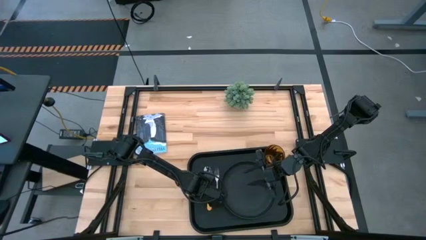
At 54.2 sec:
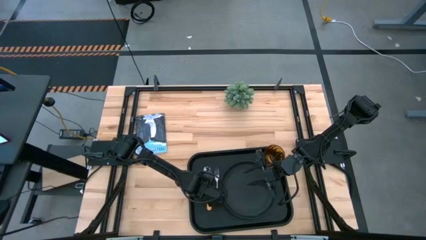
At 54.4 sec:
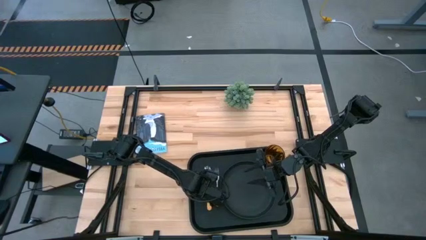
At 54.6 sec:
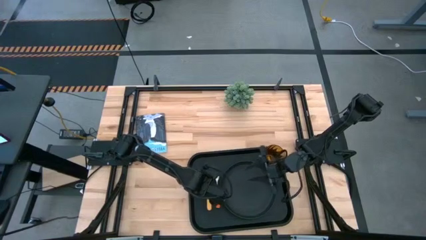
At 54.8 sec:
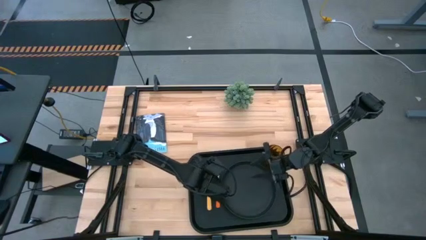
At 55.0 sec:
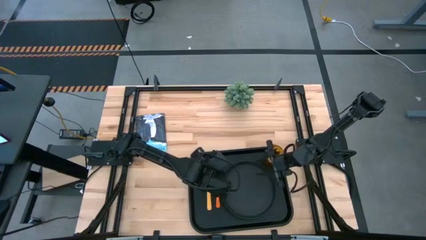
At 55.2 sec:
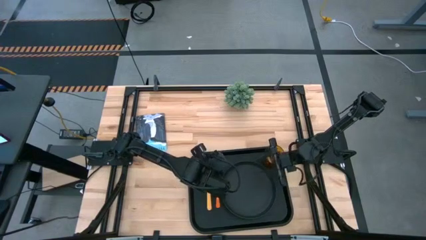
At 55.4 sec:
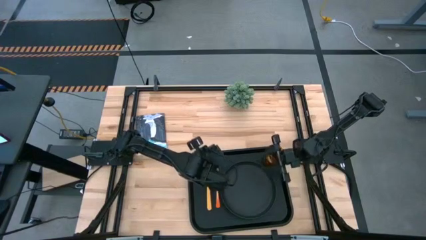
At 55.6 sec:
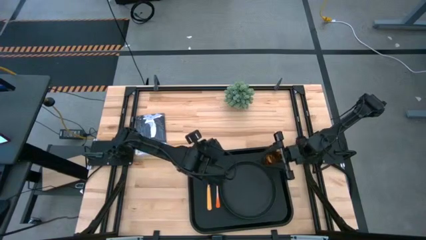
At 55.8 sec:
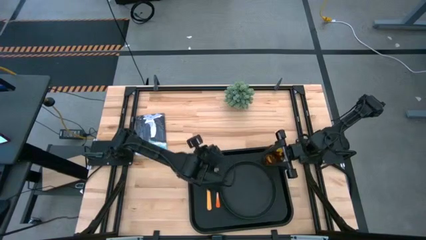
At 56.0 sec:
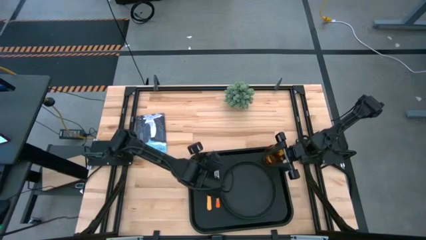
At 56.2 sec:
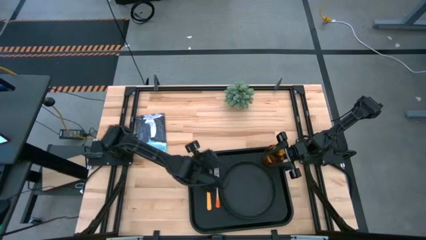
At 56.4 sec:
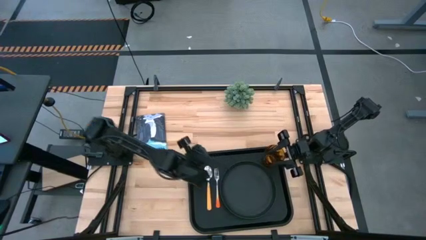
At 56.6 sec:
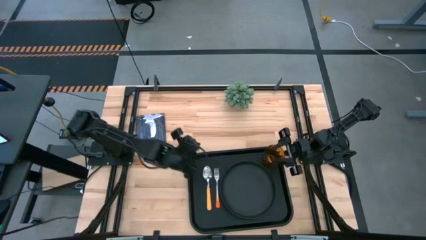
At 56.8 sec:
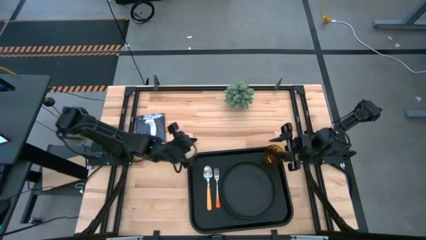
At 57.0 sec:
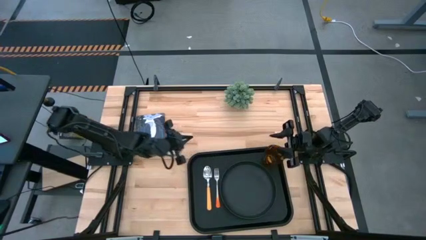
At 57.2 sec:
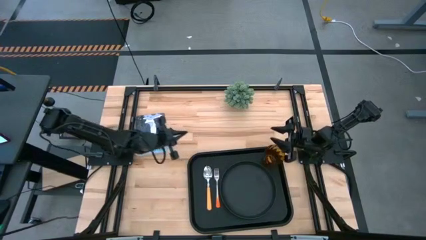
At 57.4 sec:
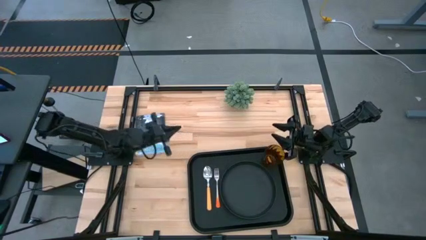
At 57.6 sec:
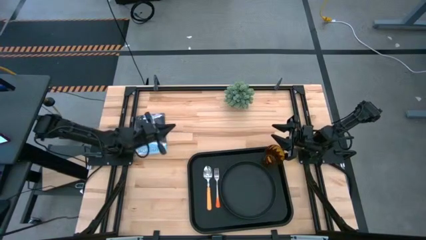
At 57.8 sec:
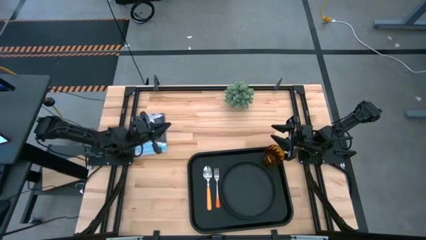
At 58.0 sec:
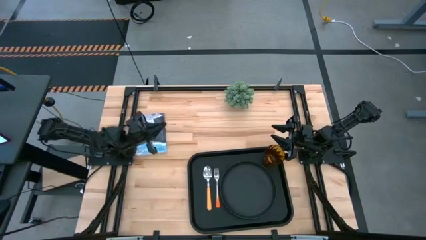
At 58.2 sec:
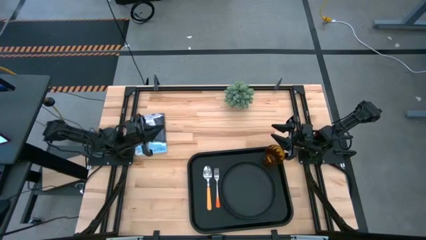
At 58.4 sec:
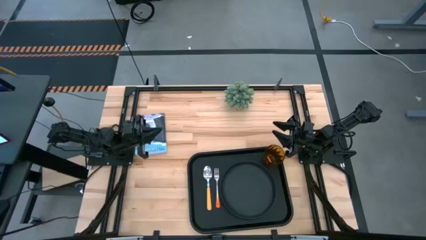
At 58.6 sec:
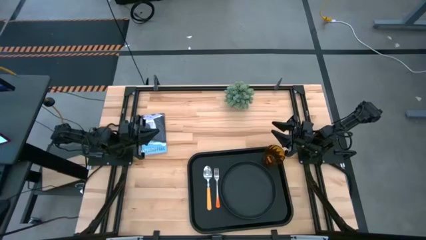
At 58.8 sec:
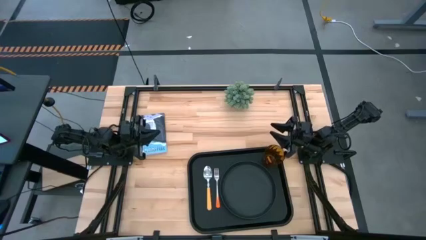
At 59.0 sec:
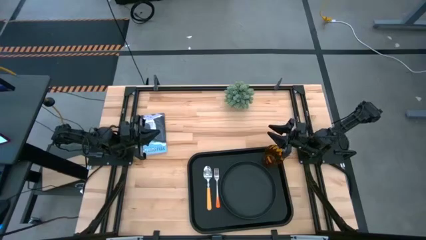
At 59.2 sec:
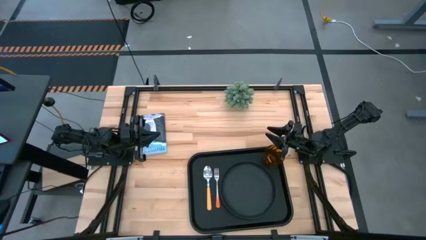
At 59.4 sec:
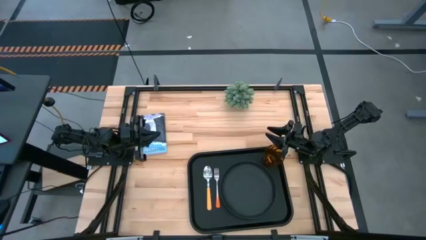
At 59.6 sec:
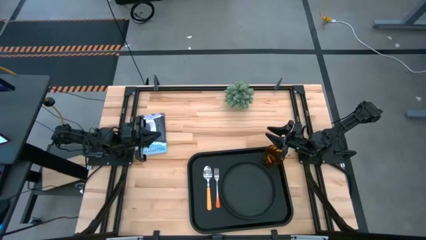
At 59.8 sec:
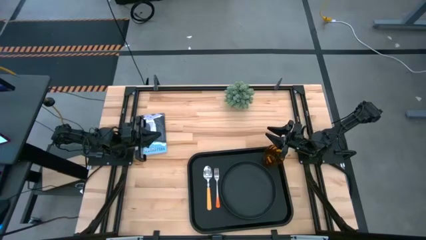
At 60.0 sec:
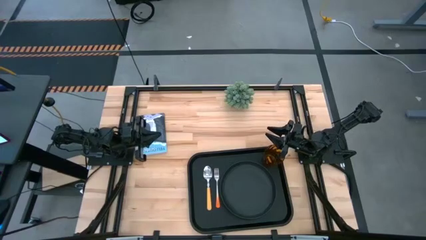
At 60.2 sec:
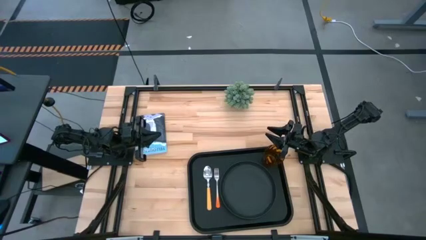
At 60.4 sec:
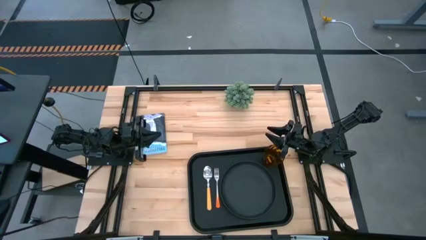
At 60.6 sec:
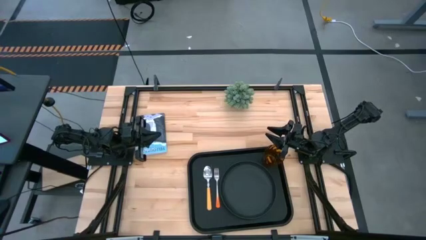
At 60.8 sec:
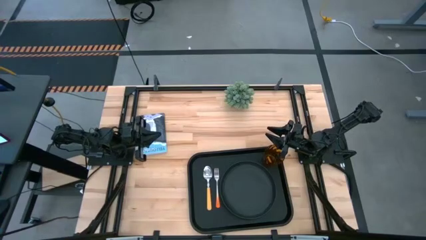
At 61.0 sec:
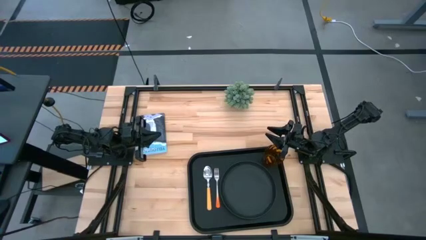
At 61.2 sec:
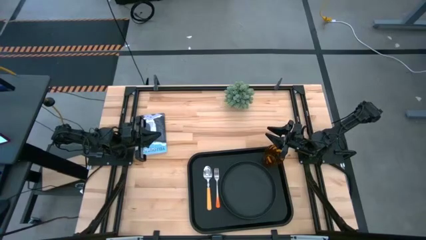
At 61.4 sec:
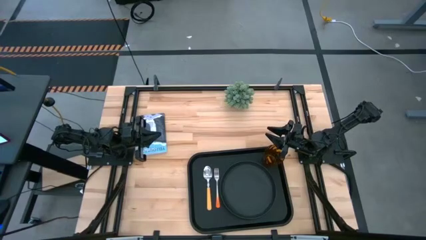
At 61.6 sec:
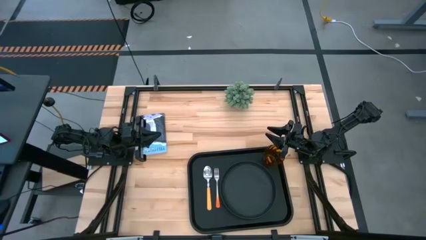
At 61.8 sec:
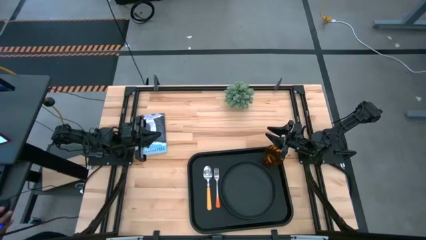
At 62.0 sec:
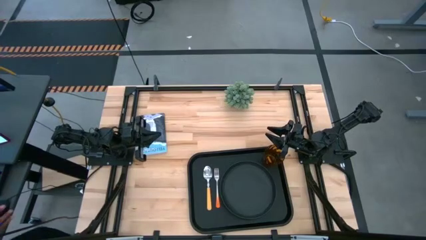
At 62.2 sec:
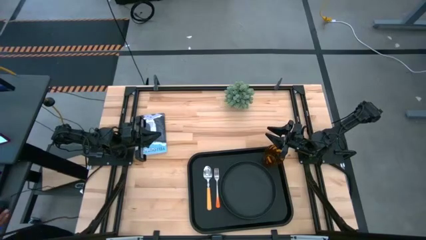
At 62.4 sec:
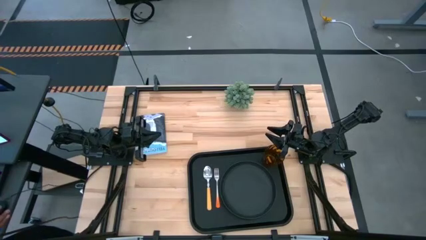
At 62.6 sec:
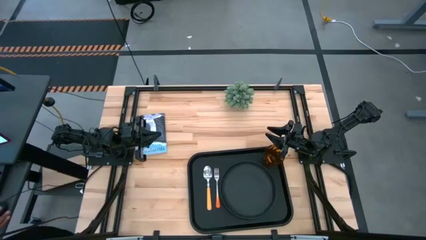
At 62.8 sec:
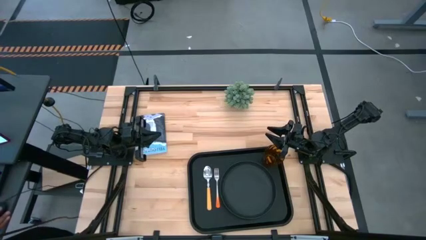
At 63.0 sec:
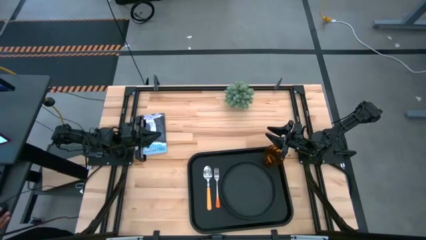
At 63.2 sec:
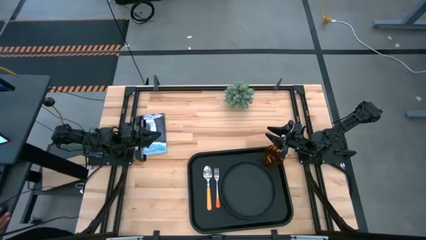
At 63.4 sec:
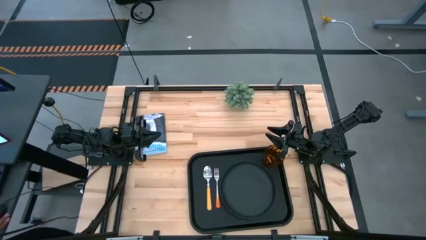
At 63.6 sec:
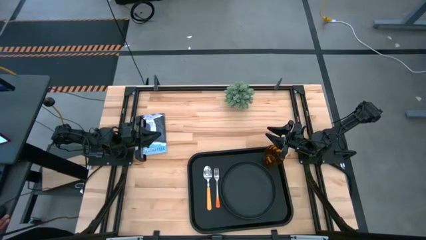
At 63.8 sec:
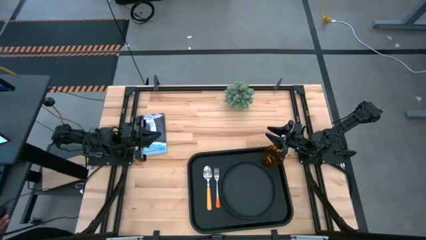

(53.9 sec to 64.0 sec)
Task: Pick and place plate/cup/fork/spoon on tray
Return to Home Position

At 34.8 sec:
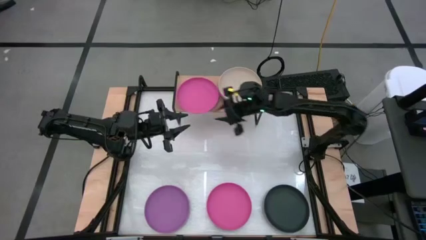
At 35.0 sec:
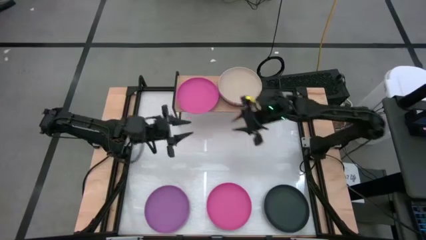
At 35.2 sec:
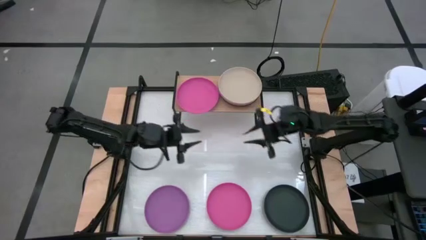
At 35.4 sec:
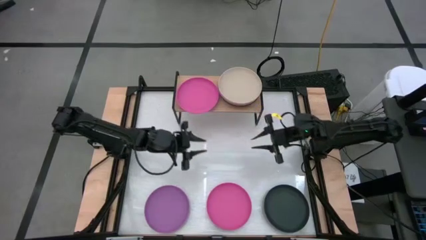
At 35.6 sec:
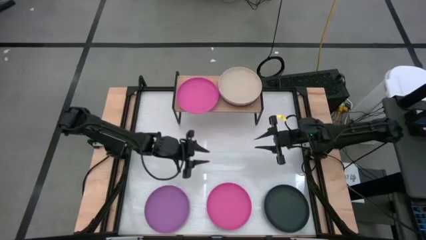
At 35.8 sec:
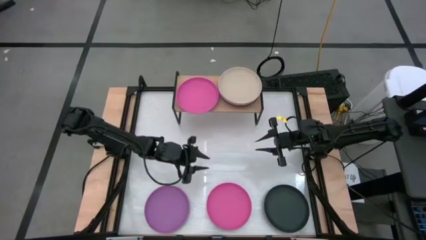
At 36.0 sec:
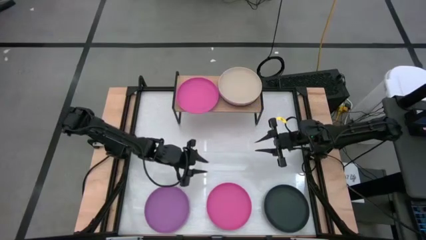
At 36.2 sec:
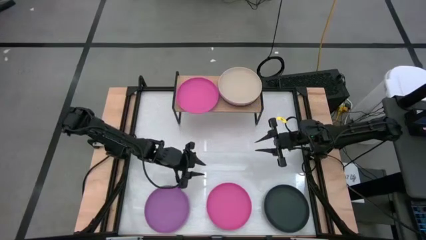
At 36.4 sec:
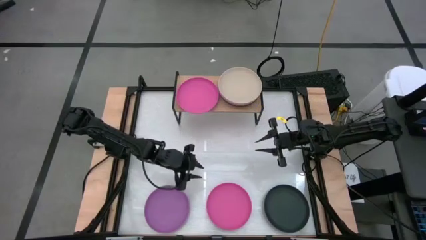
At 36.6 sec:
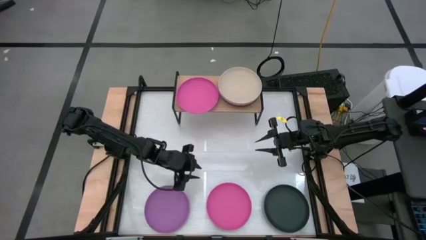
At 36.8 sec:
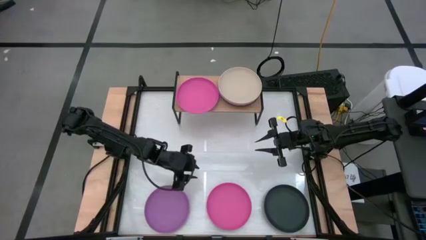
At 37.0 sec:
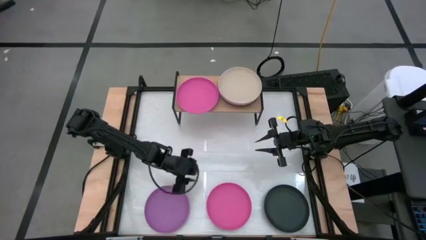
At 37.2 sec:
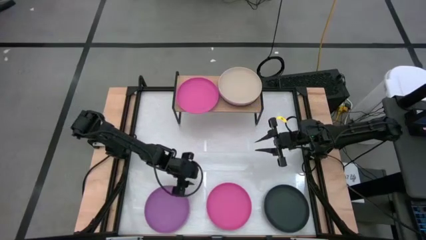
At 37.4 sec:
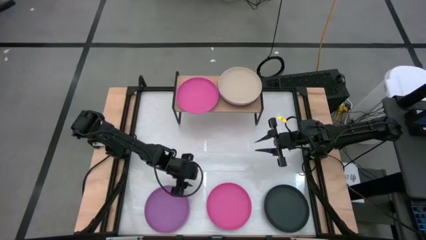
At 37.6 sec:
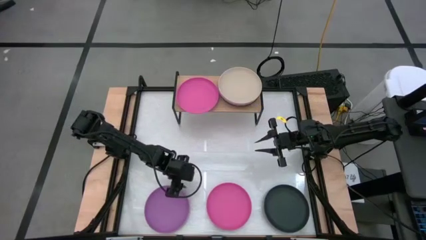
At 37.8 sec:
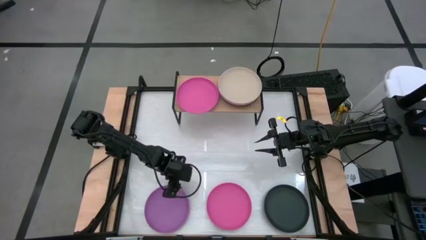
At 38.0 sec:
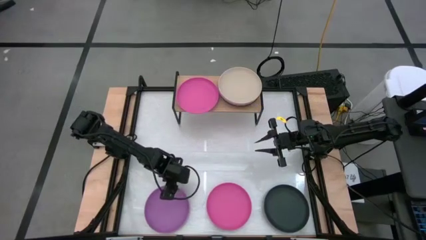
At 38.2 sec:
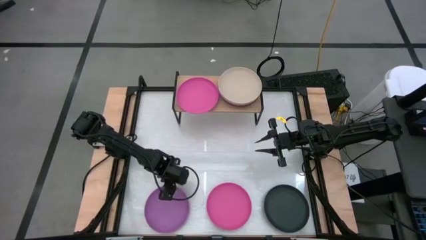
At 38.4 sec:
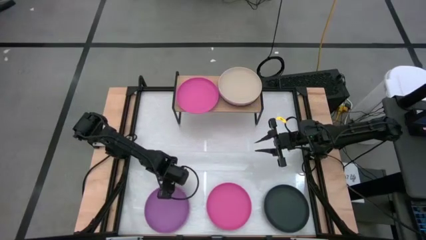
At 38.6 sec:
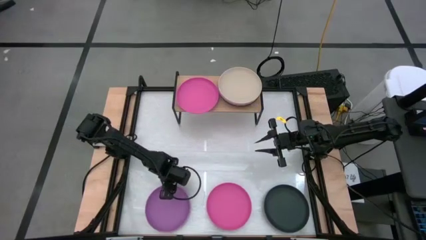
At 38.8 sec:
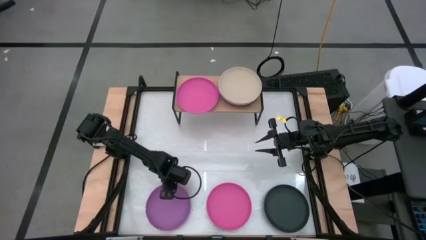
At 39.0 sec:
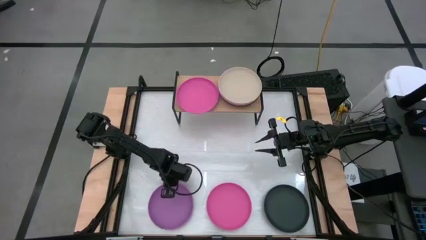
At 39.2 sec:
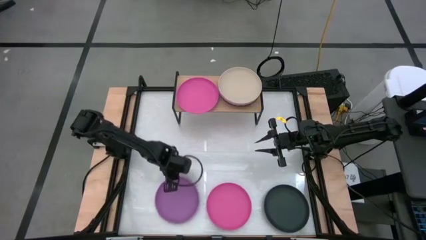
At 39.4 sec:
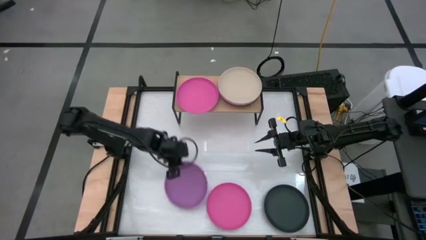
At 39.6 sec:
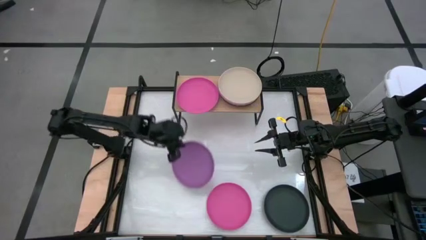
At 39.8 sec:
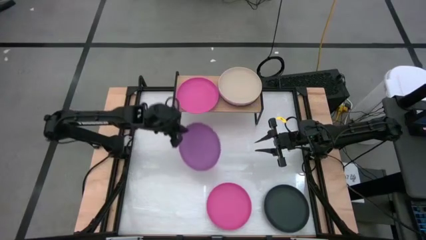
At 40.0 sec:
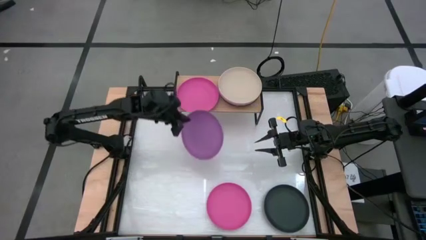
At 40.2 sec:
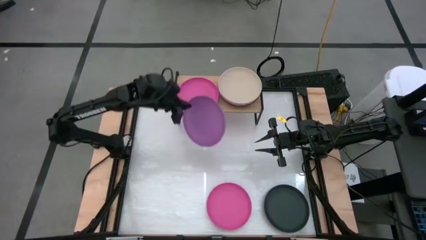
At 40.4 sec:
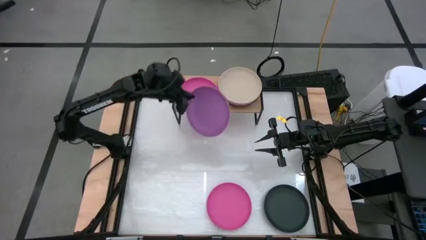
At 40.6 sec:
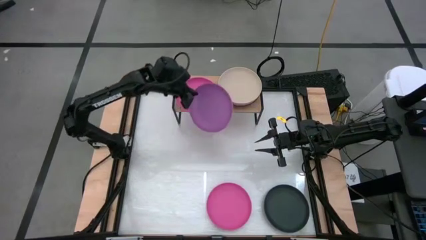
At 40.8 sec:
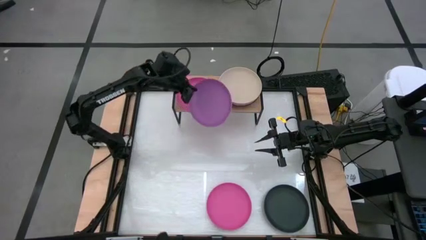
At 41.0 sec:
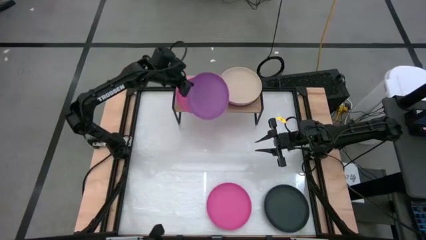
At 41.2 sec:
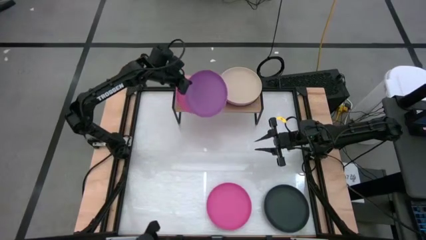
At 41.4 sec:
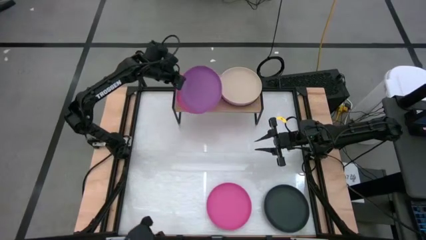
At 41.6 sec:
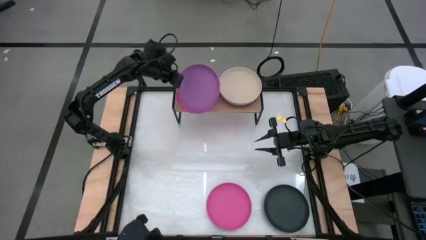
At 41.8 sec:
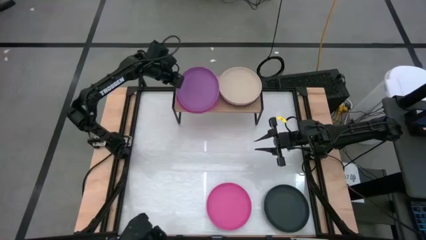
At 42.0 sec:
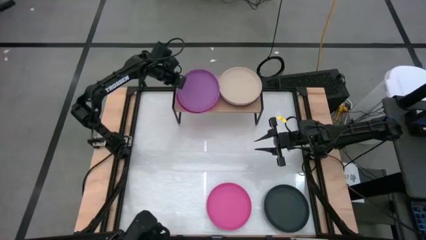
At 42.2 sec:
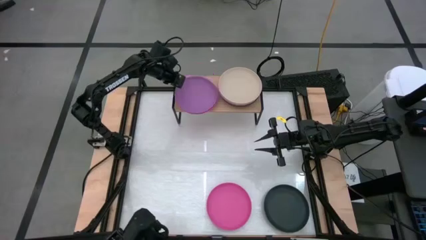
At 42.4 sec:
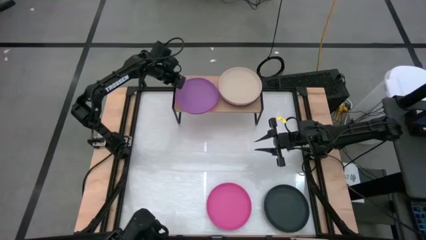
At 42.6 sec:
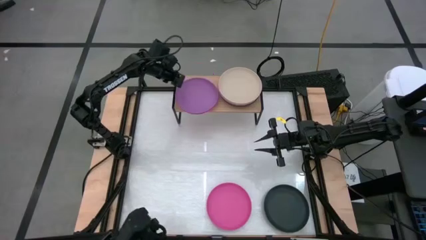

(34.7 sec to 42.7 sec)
Task: Place and stack plates onto a shelf
Stack the violet plate on top of the pink plate on the shelf
